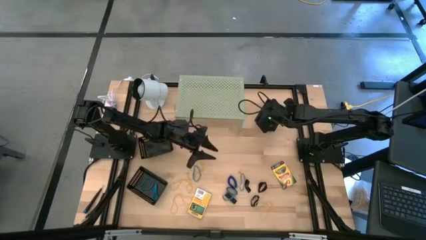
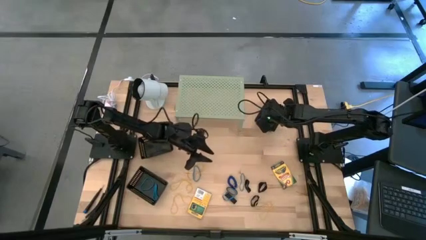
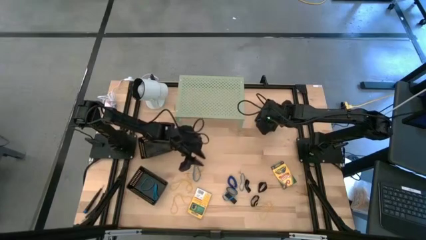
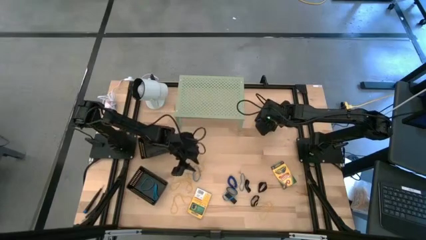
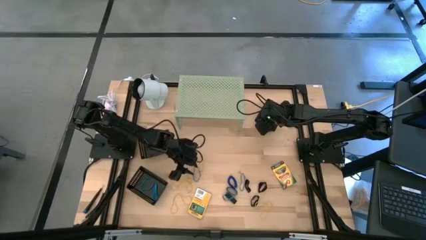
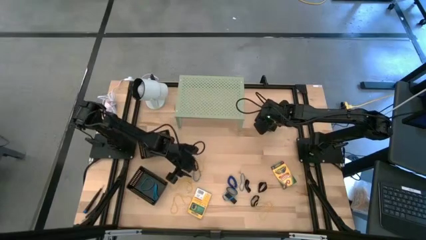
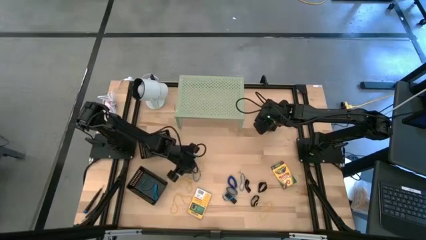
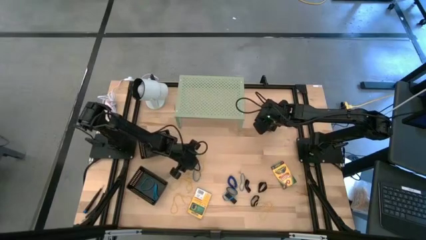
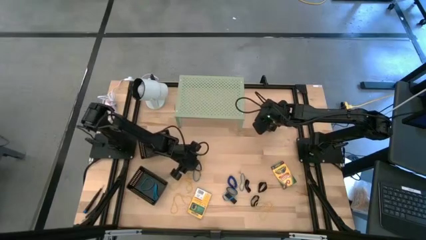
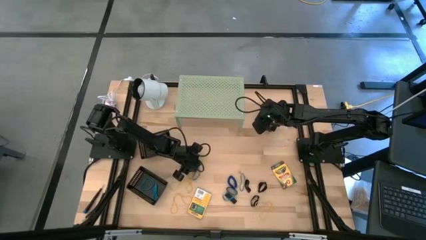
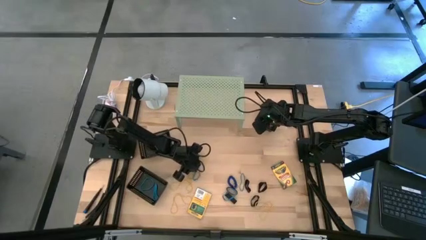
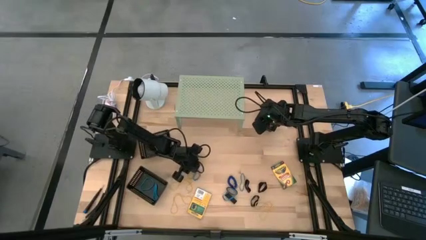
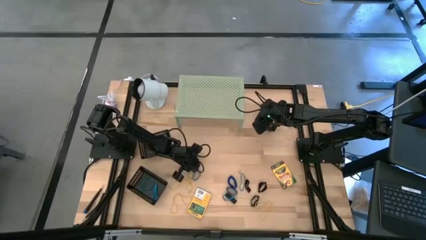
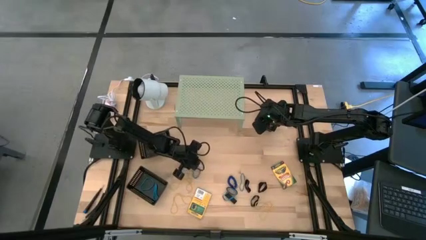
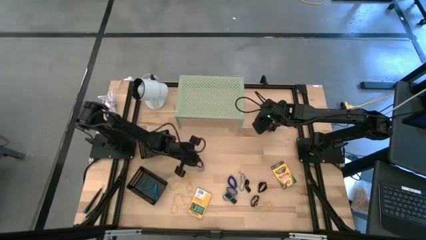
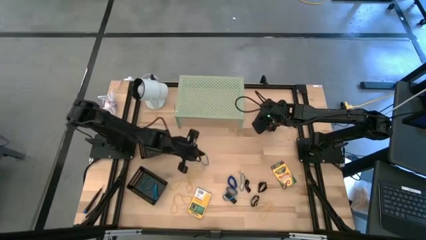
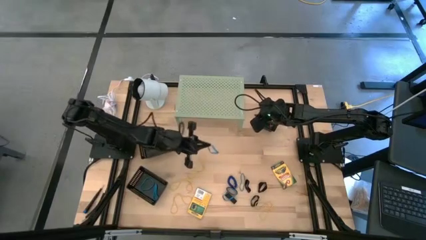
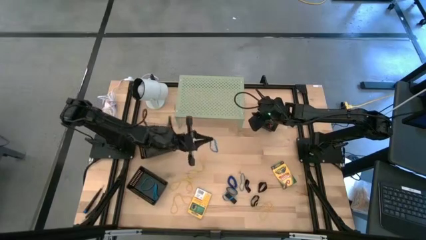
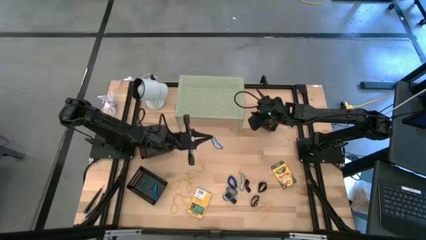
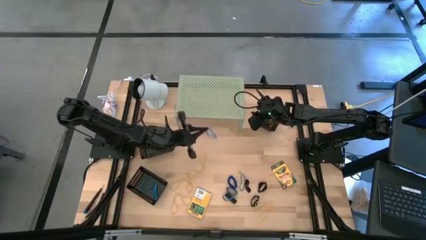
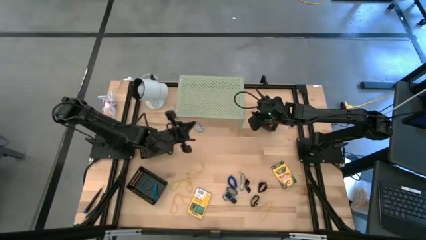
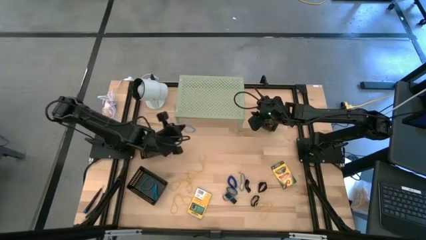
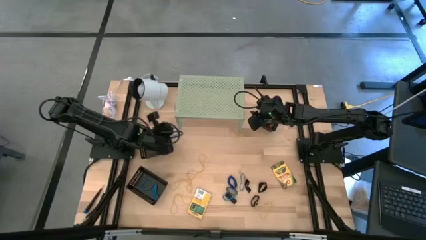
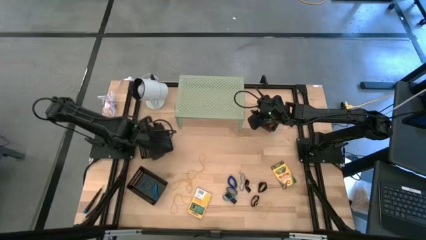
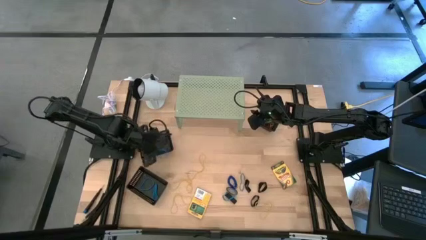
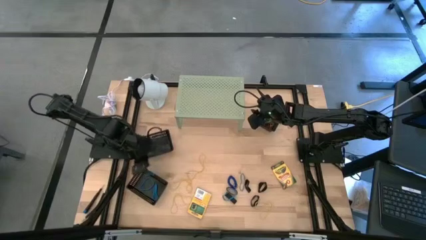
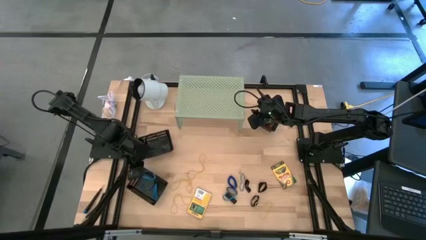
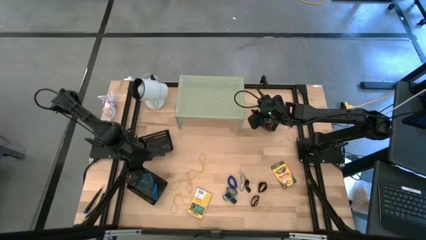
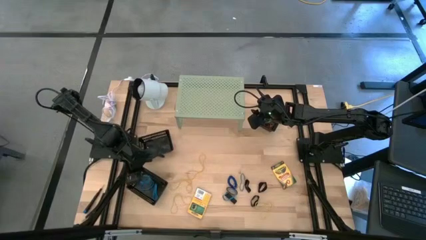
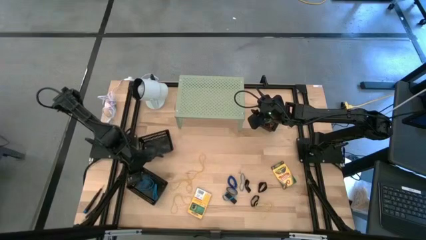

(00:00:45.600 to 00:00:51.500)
Task: Pick & Place Office Desk Supplies
Put the blue rubber band into the bottom left black bin

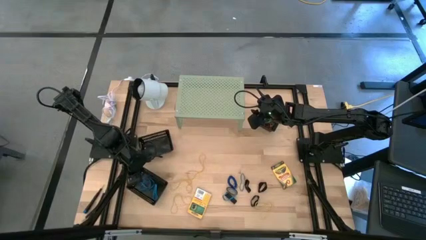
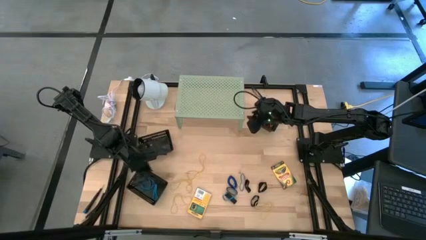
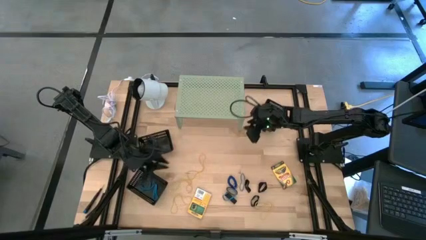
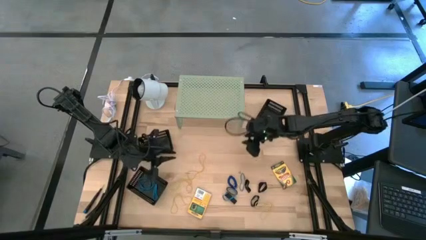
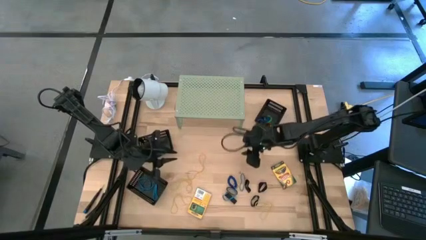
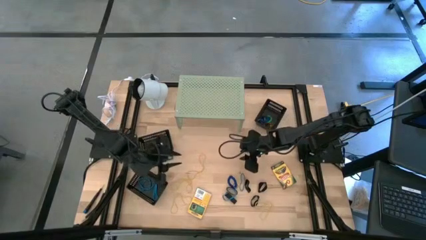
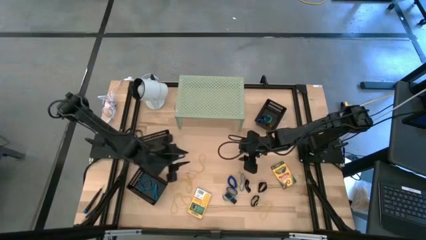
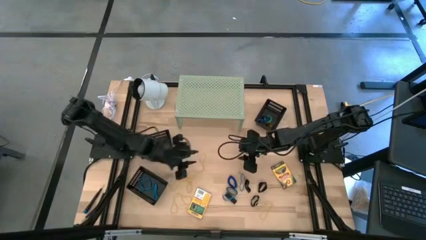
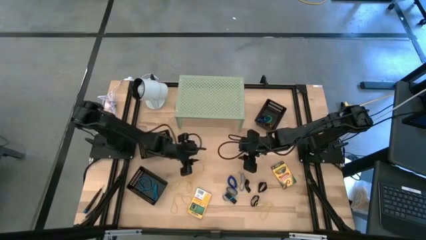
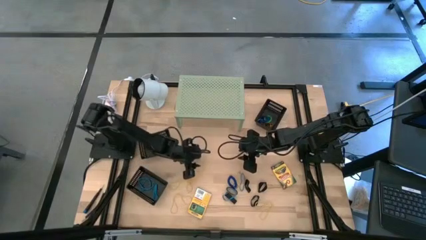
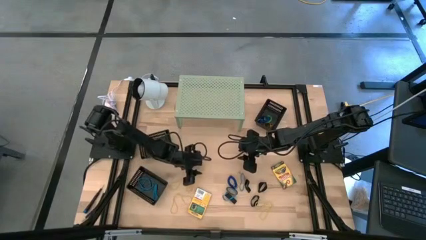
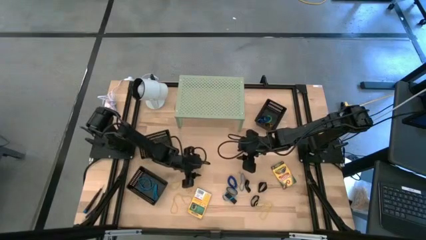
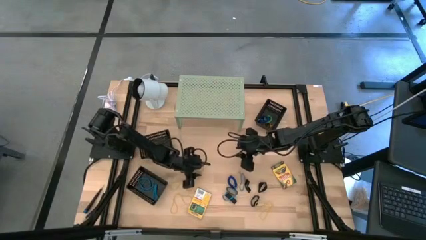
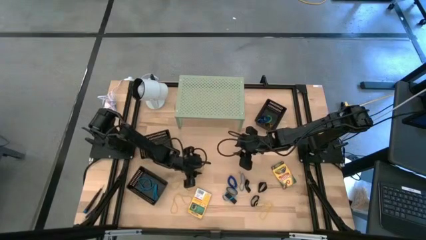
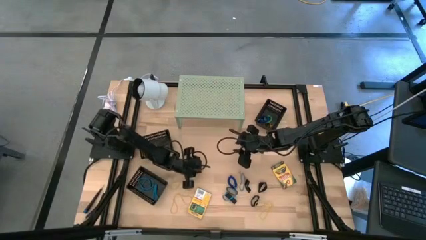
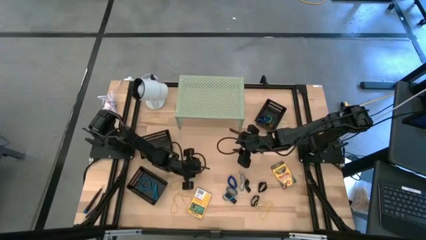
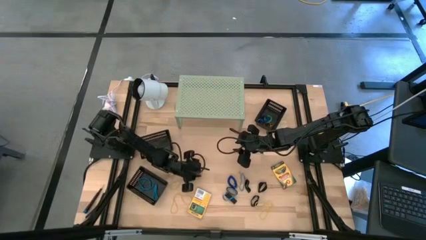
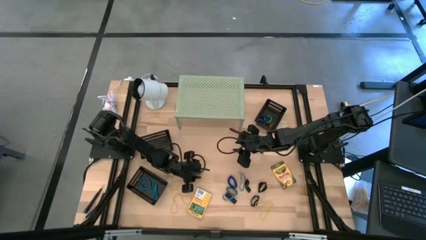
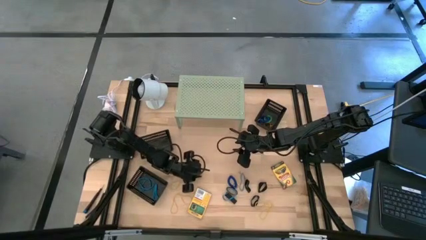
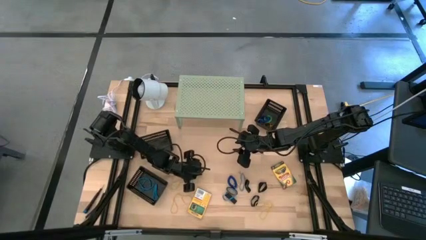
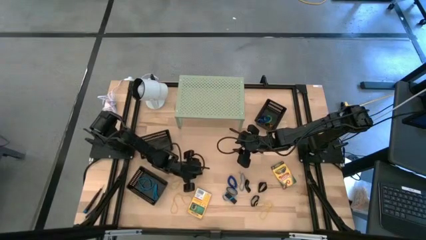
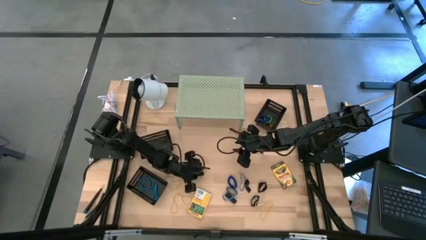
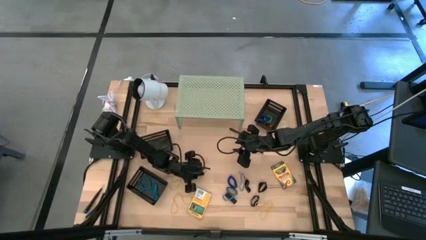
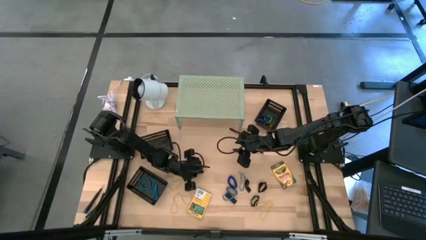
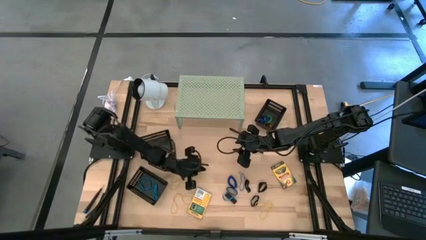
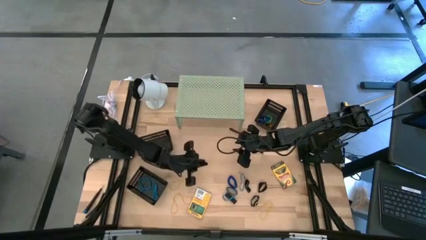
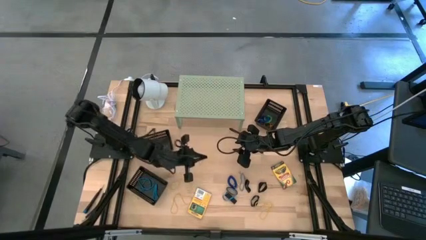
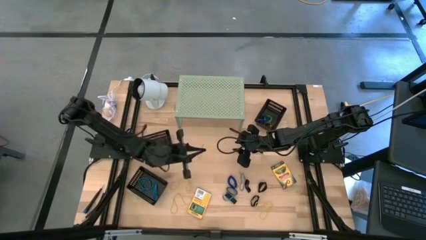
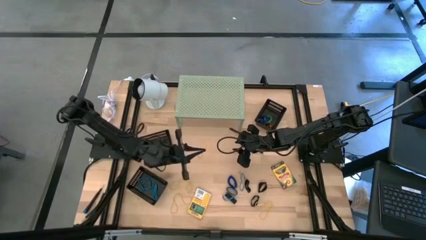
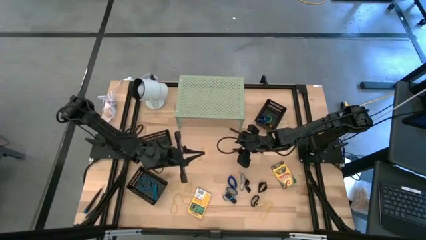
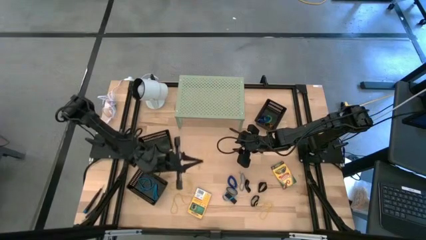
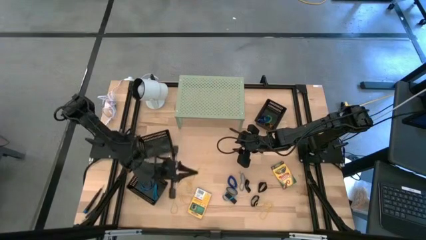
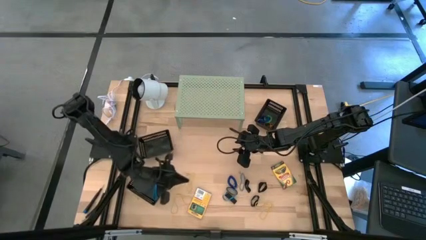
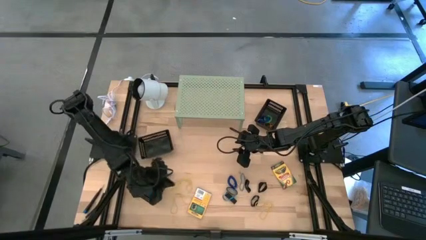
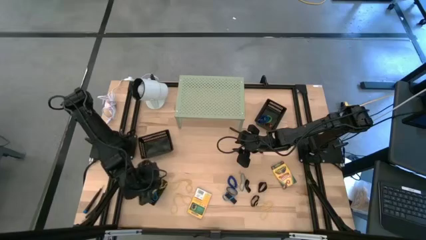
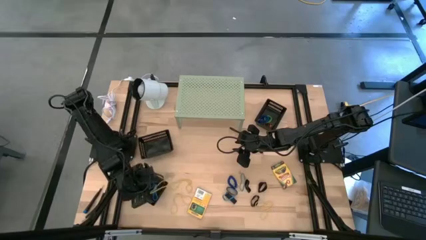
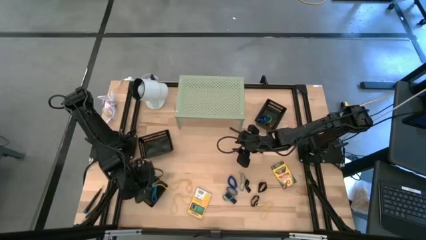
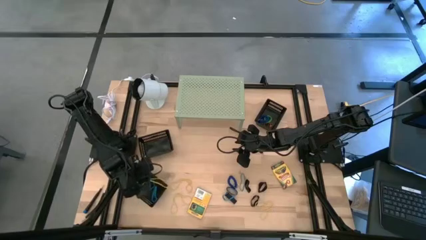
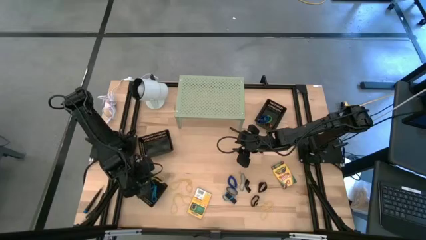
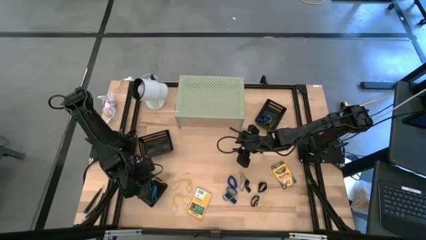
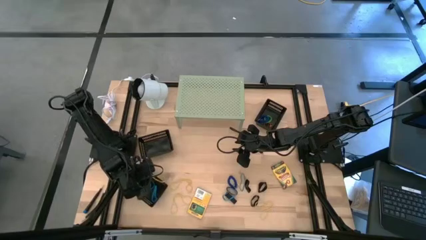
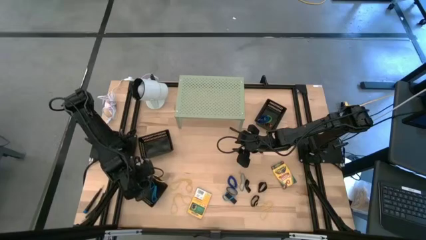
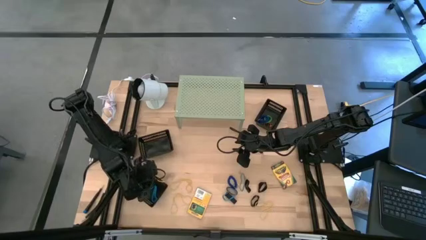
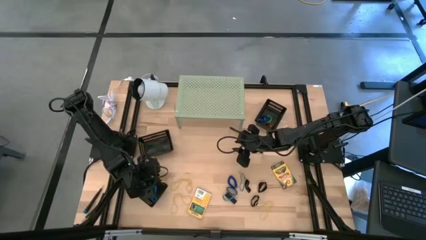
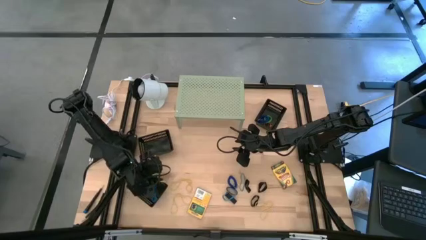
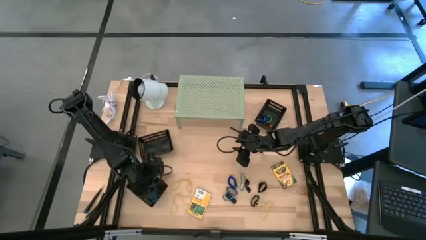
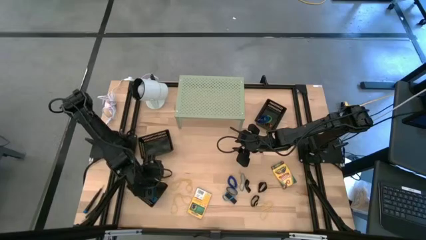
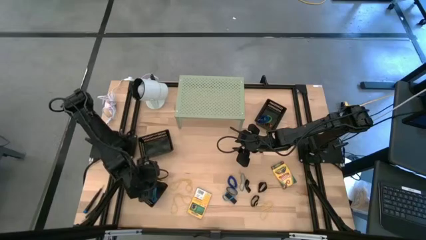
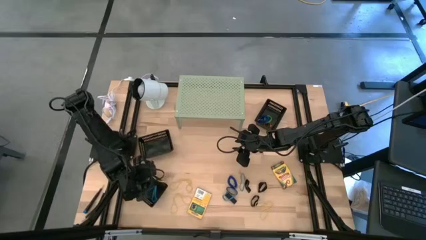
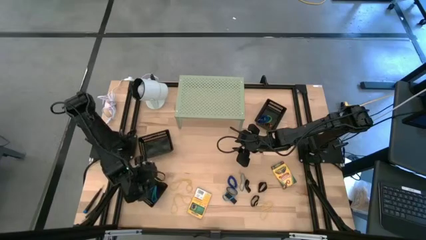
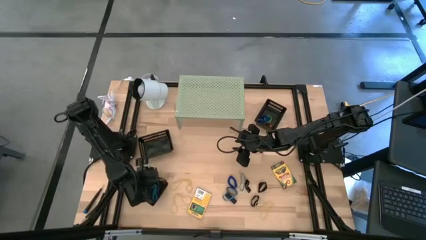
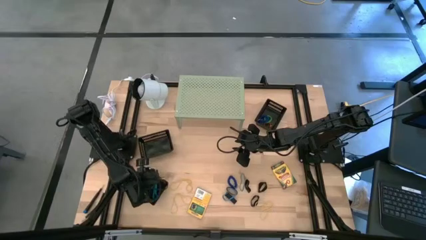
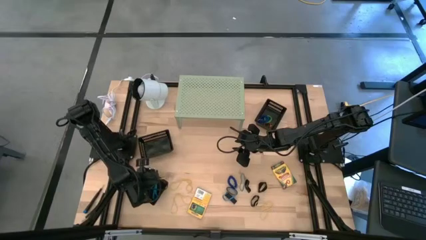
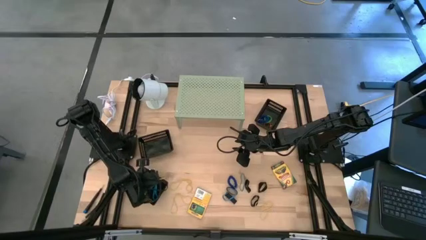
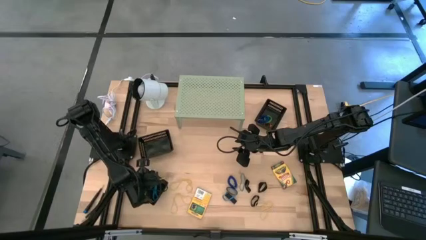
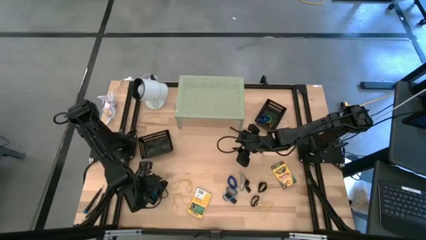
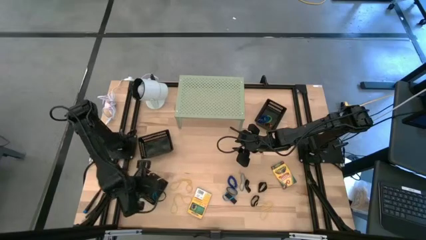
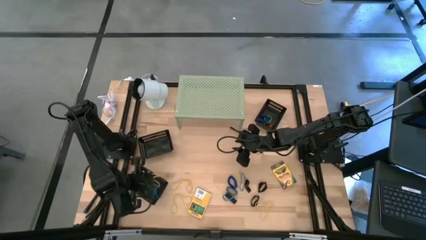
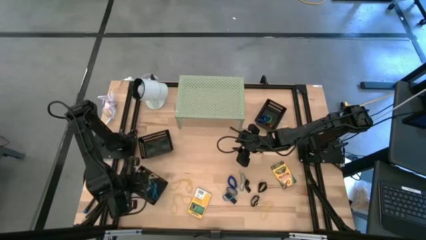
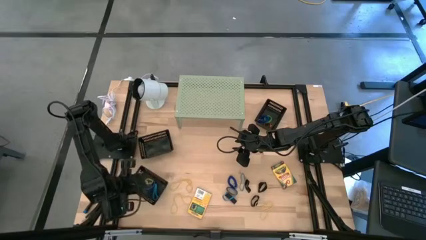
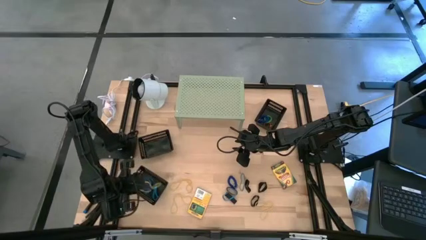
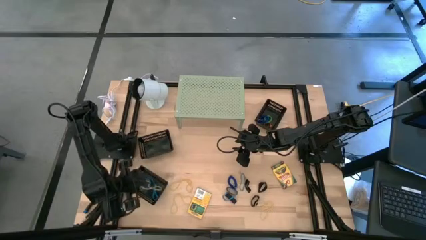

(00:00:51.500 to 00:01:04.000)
Put the yellow rubber band into the bottom left black bin
